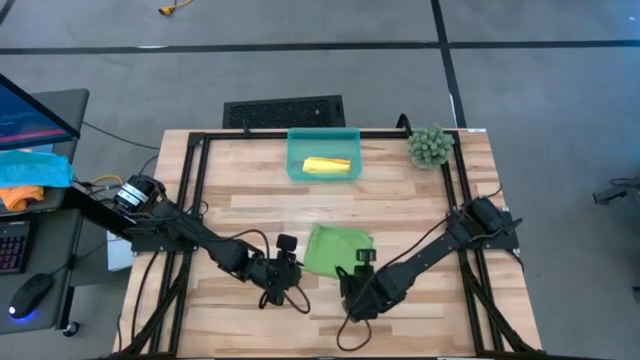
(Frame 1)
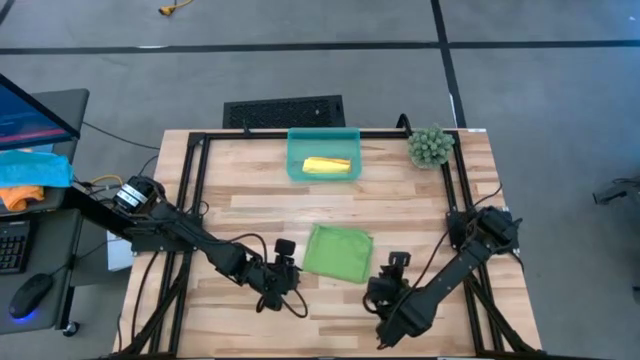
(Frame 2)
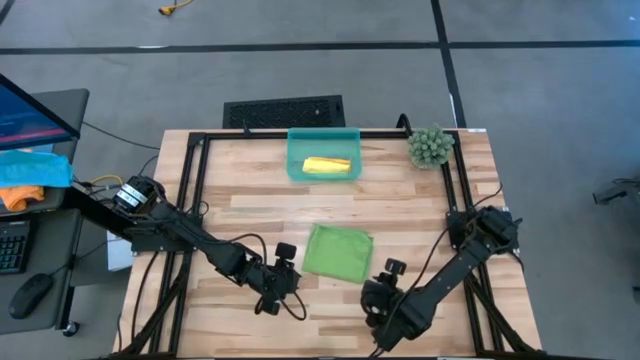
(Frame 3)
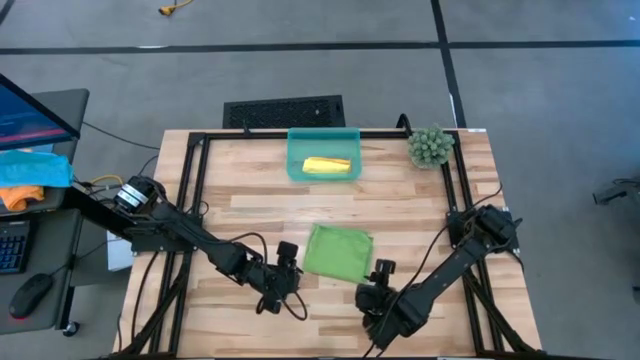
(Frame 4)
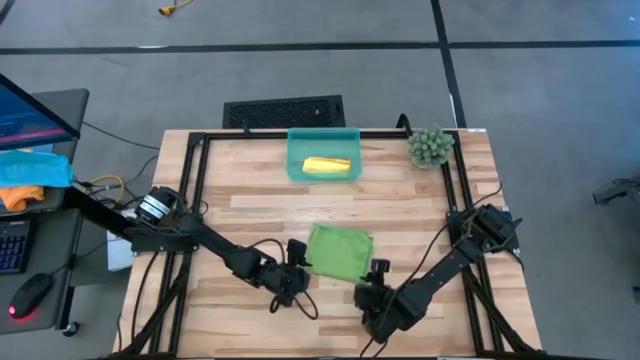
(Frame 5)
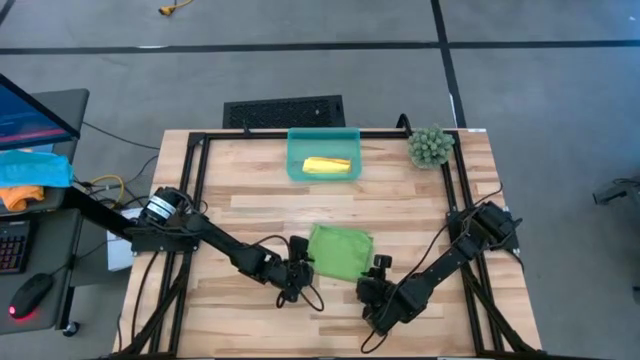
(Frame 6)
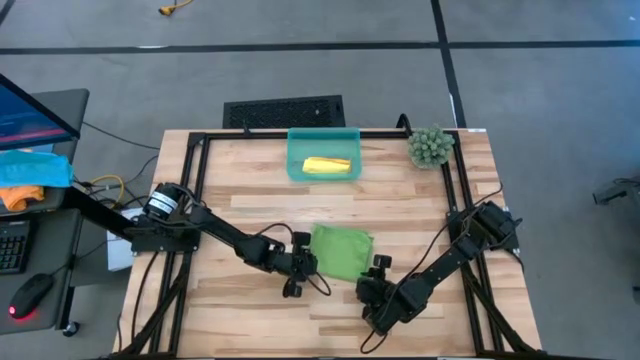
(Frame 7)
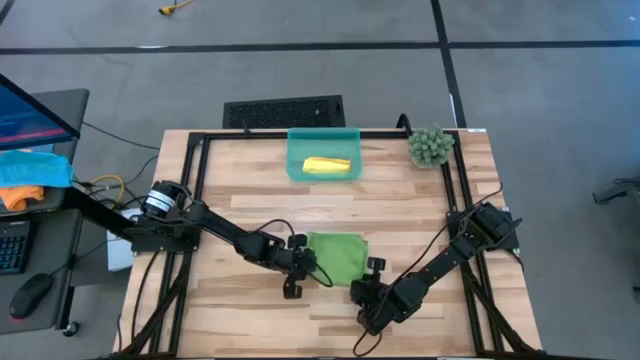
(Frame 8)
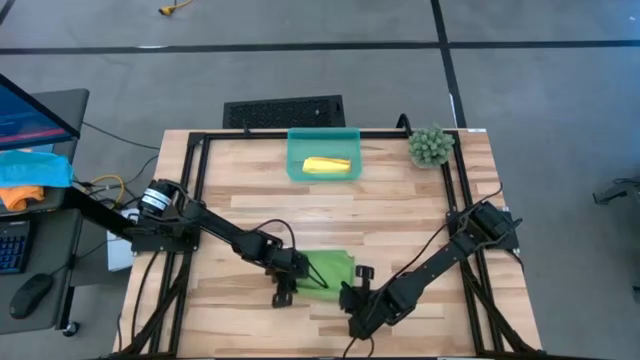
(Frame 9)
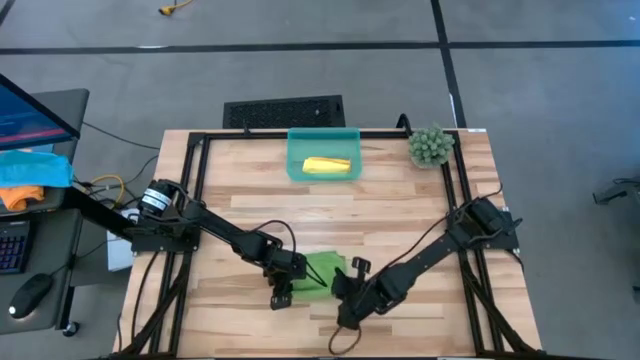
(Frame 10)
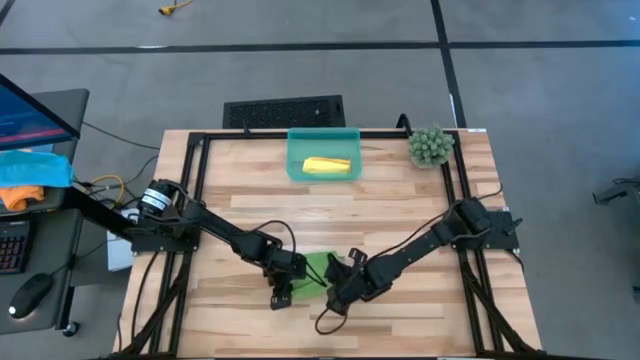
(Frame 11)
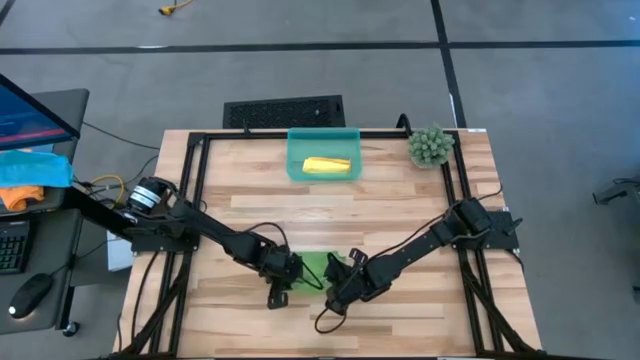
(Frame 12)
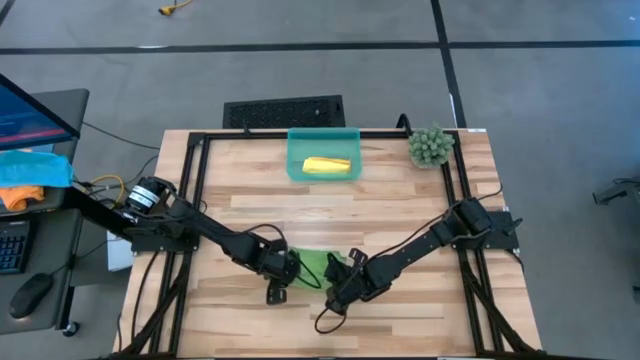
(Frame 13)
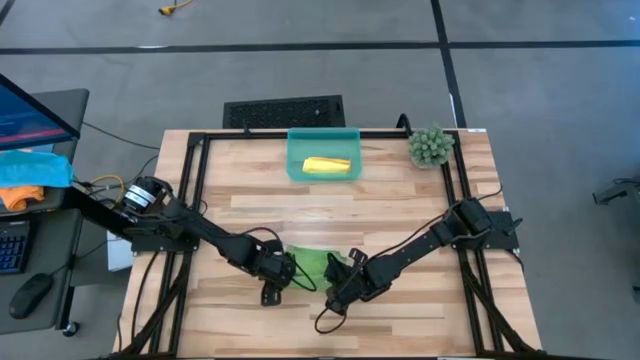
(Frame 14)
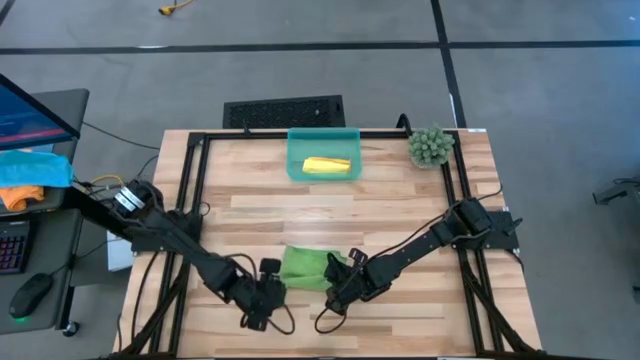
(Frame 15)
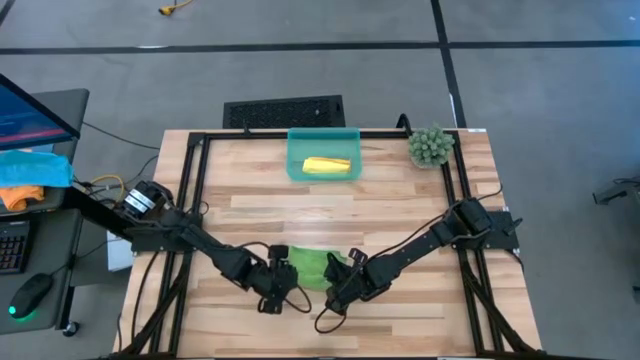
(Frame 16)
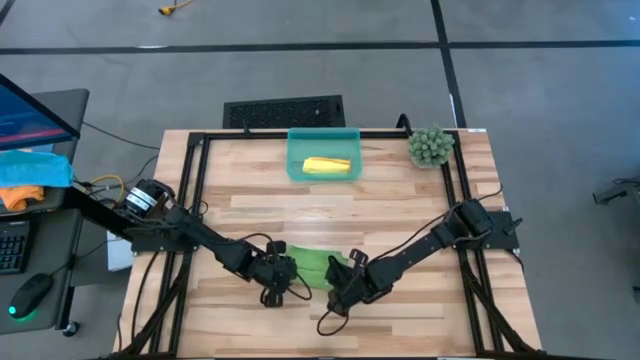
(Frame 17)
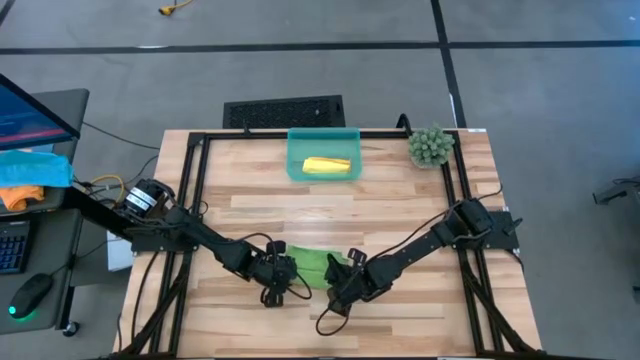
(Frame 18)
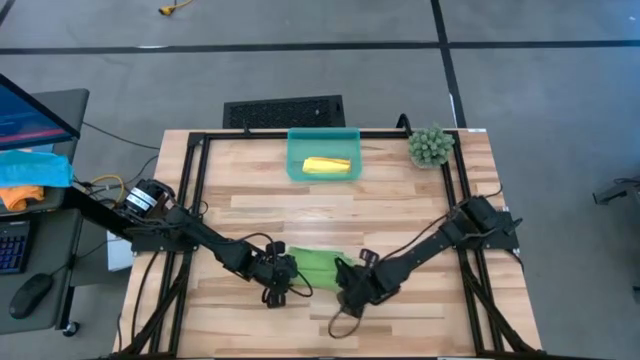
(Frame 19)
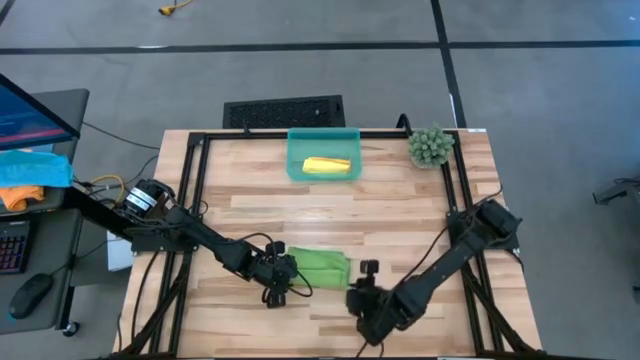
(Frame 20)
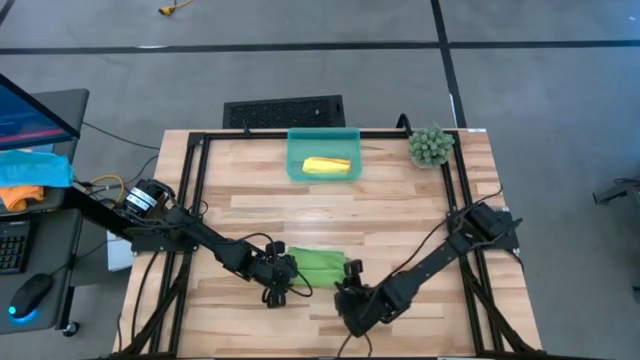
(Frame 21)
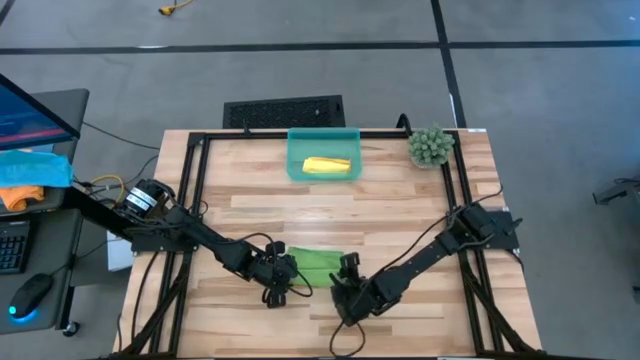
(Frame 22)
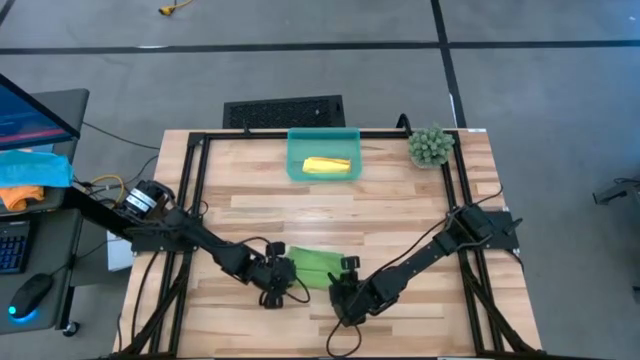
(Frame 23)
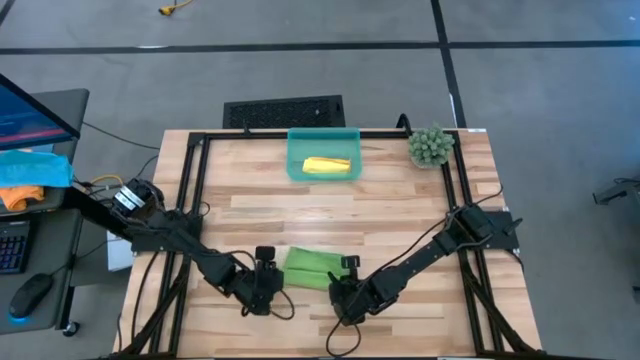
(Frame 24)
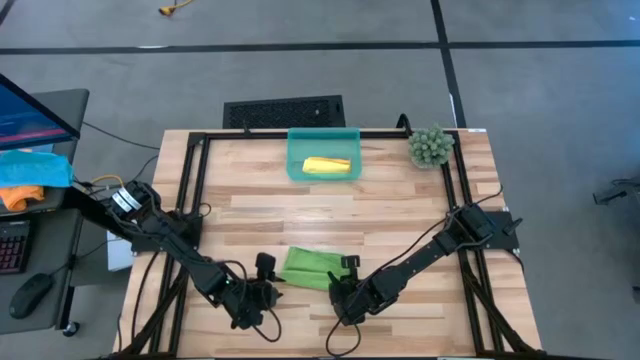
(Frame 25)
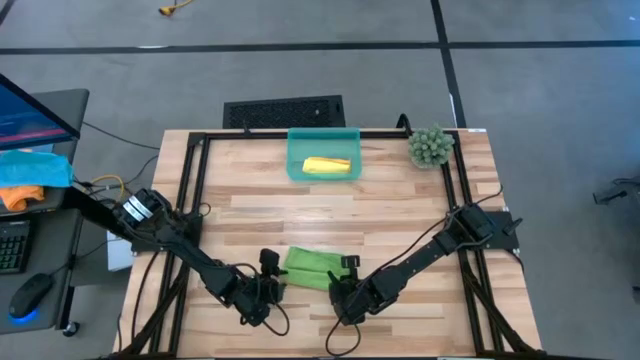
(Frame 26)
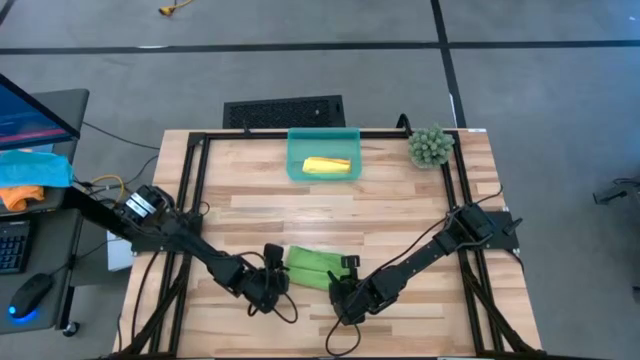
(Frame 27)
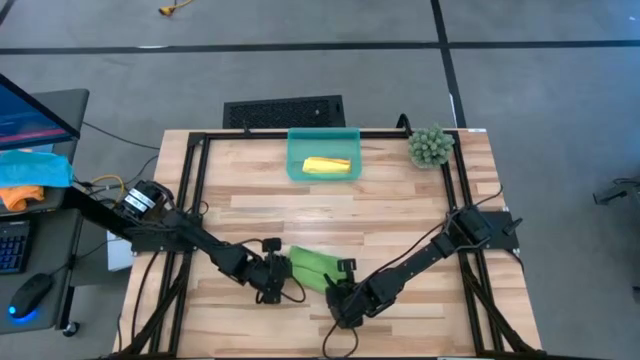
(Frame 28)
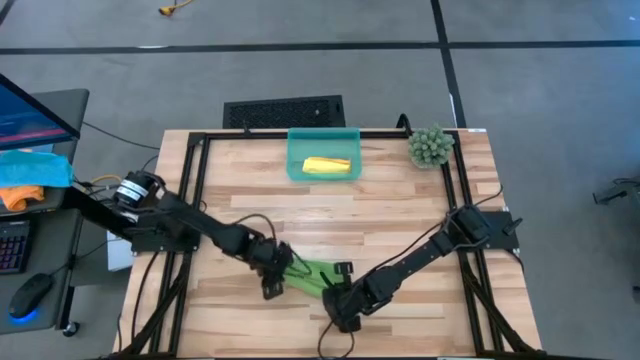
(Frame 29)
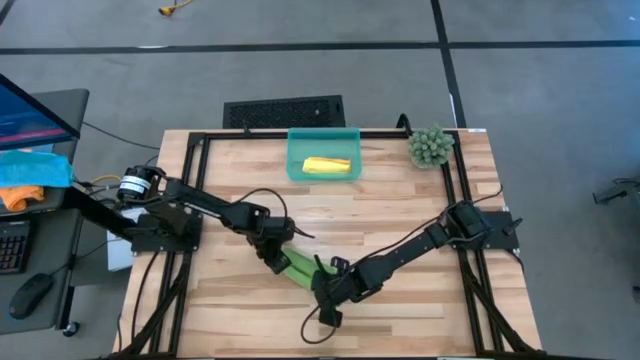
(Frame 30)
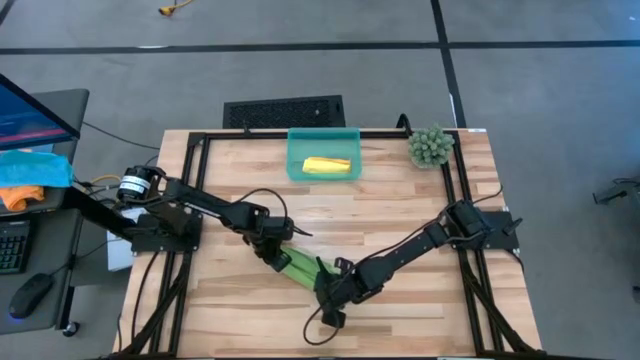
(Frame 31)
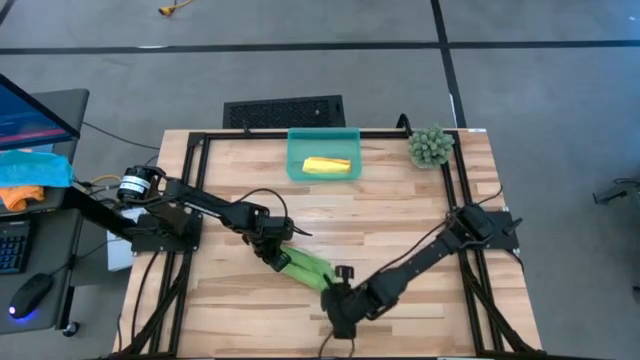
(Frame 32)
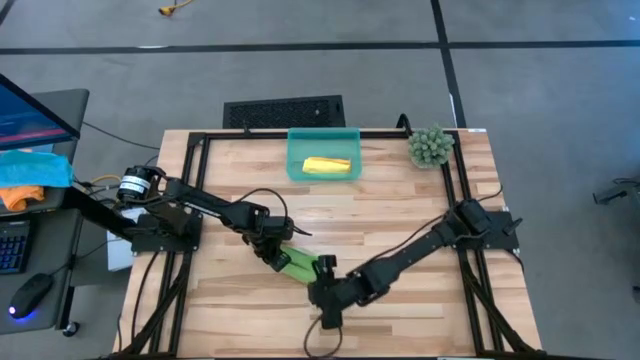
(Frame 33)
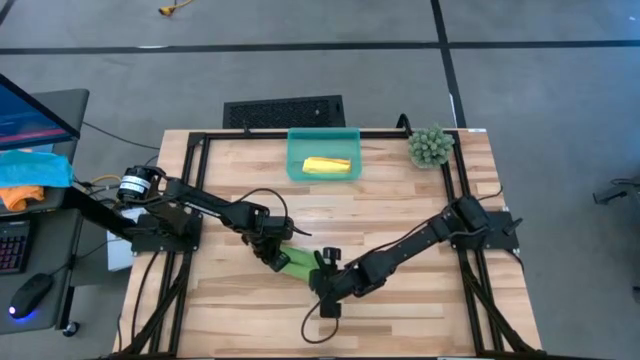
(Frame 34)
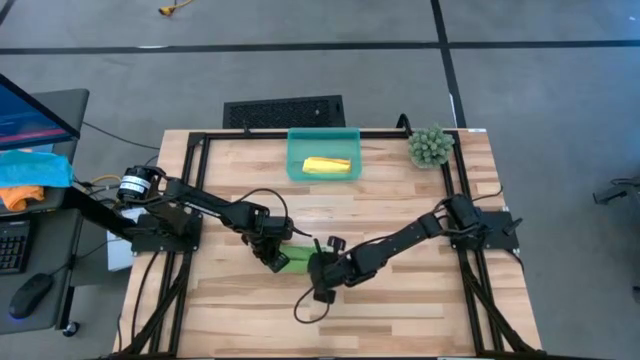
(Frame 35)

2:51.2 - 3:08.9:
Task: Roll microfiber towels into tight, uniform cylinder then place into a basket
Roll the green microfiber towel

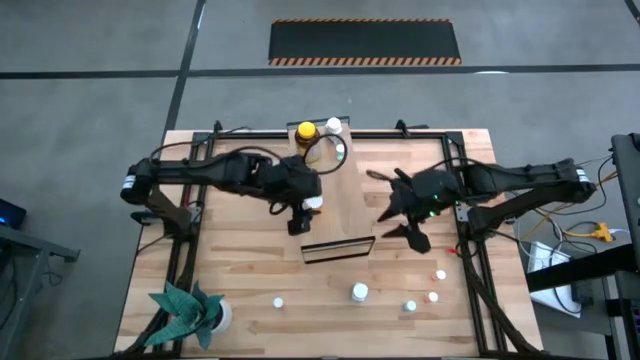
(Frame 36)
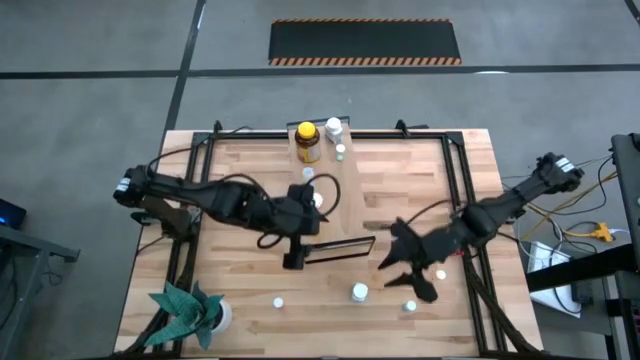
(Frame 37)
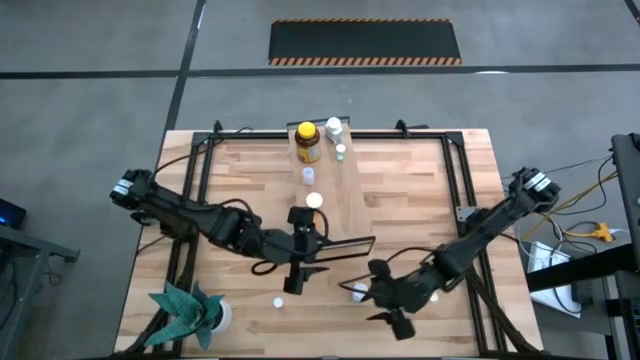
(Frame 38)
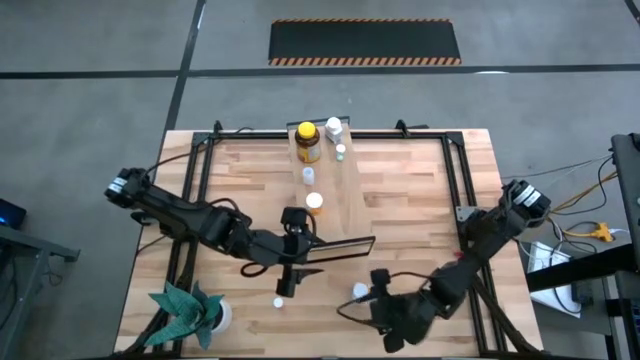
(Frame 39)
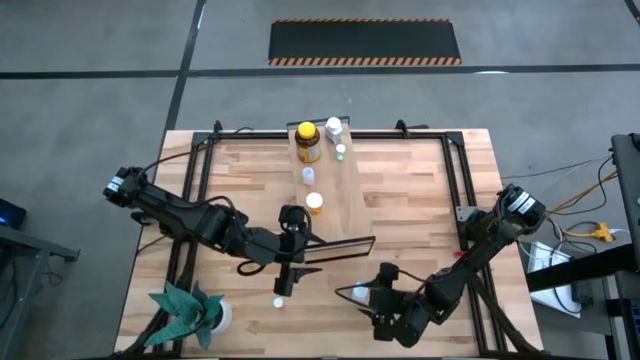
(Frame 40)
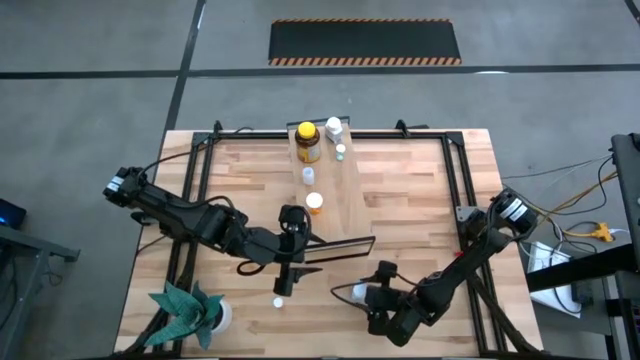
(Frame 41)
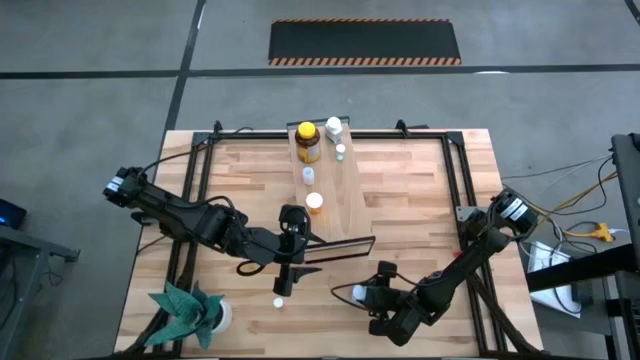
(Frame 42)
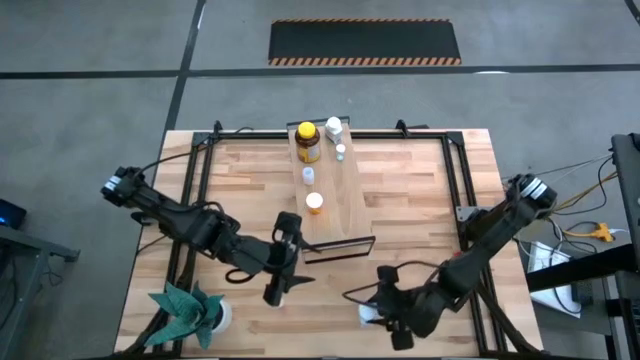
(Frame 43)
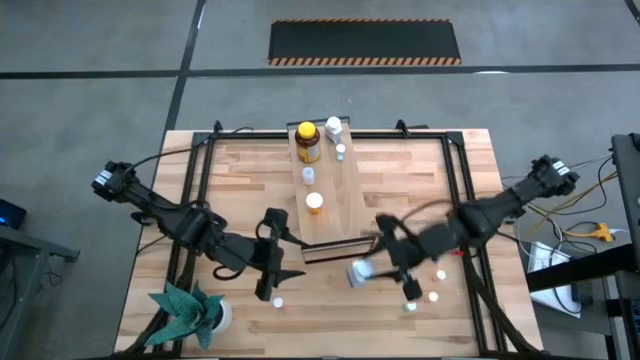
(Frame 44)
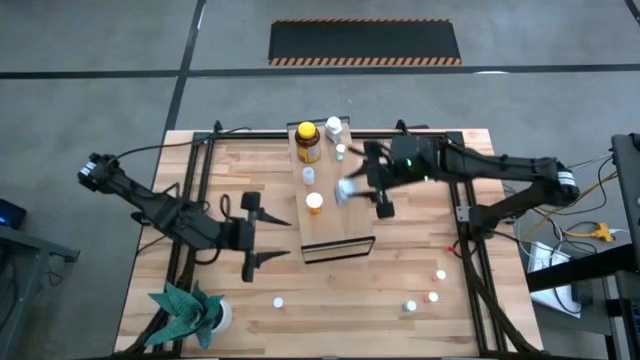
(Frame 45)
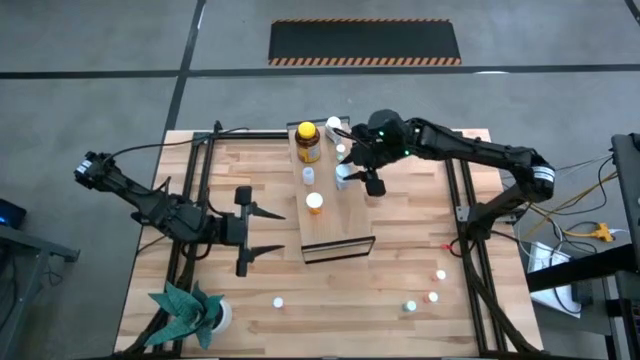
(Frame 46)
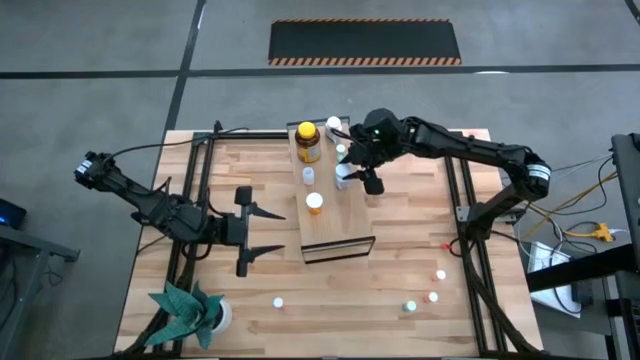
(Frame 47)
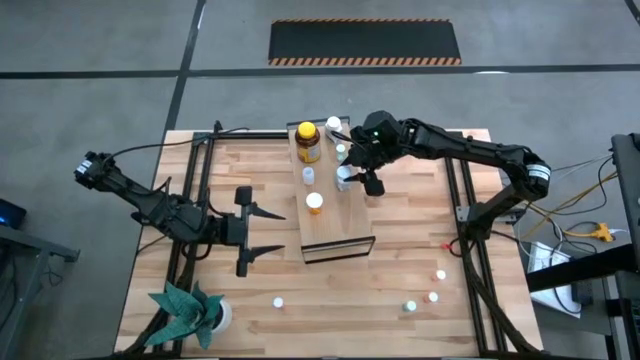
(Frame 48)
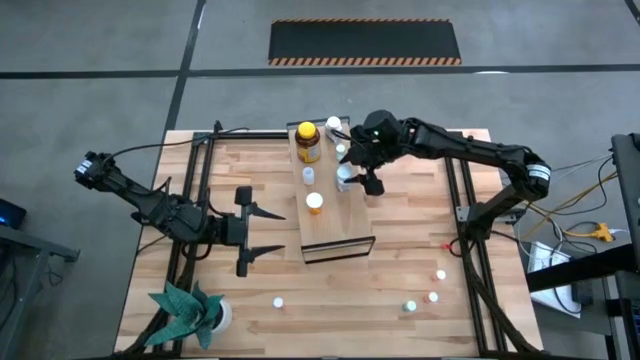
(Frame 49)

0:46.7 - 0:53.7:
Task: Pick and place medicine bottles onto shelf by color
Put the white pill bottle on the shelf
